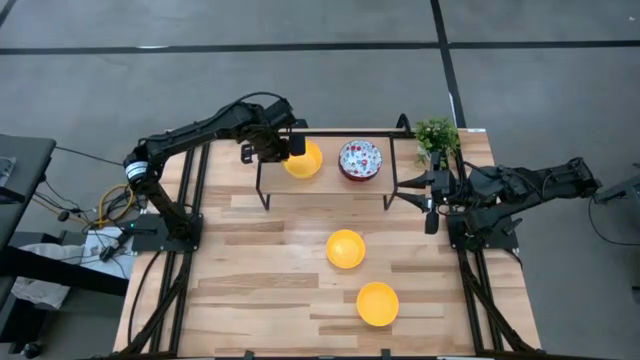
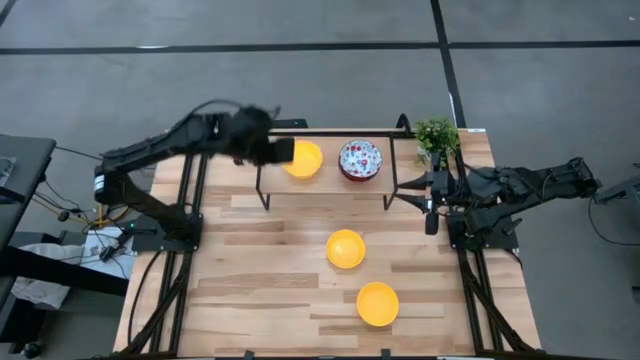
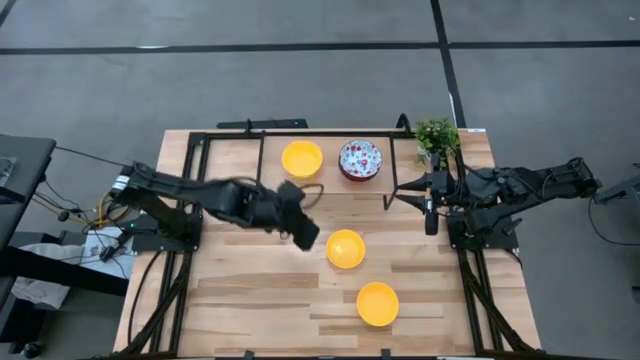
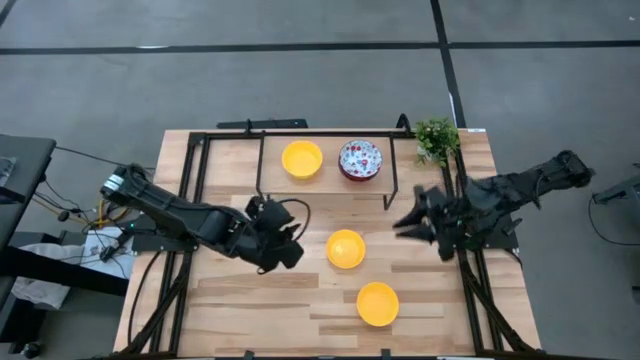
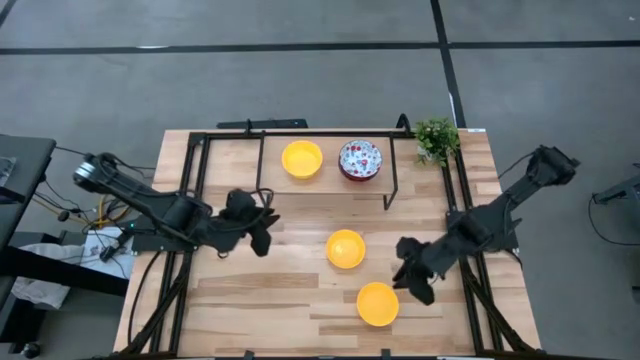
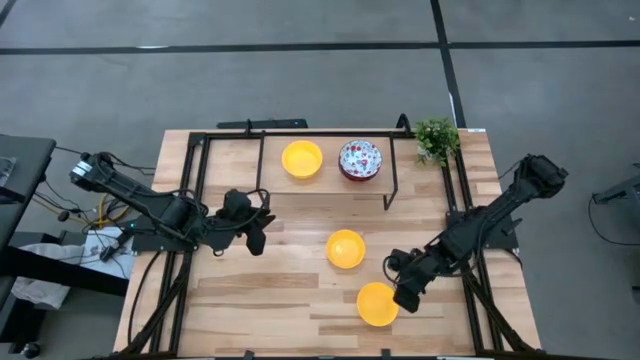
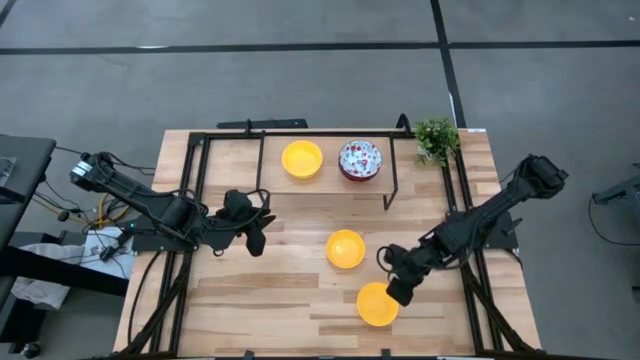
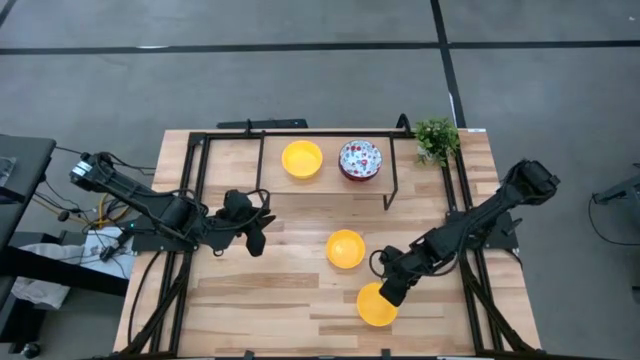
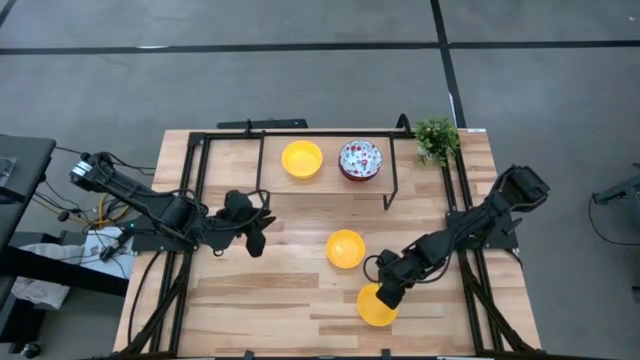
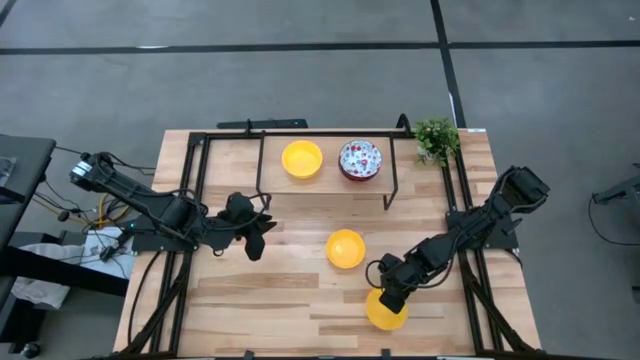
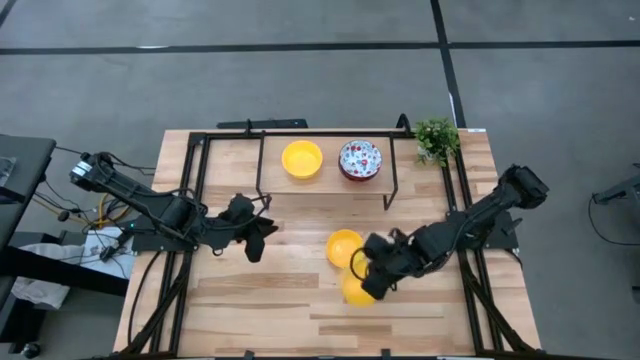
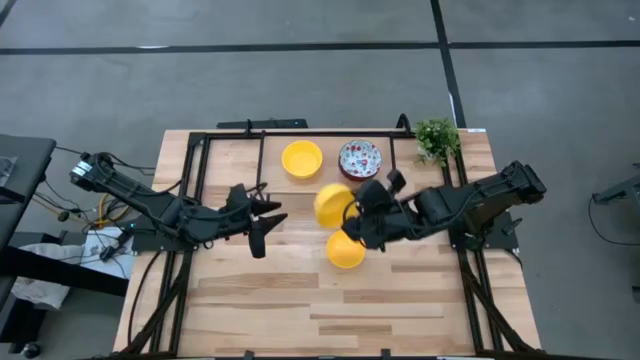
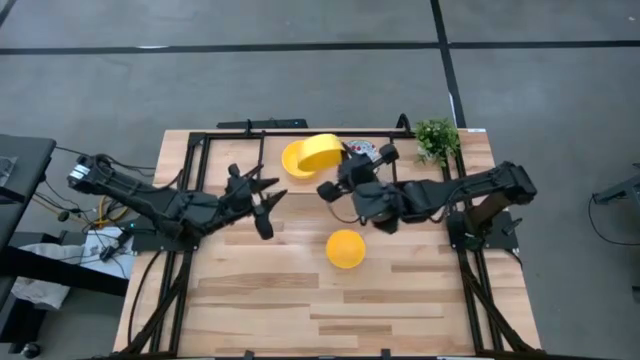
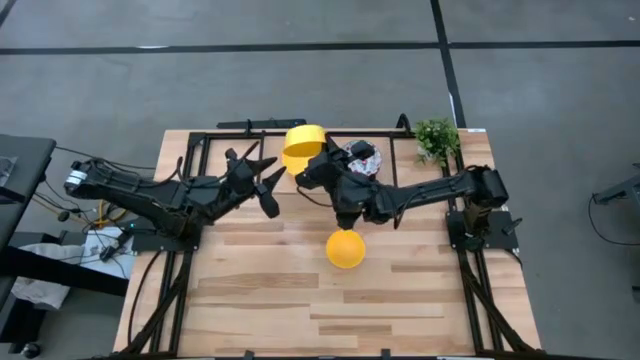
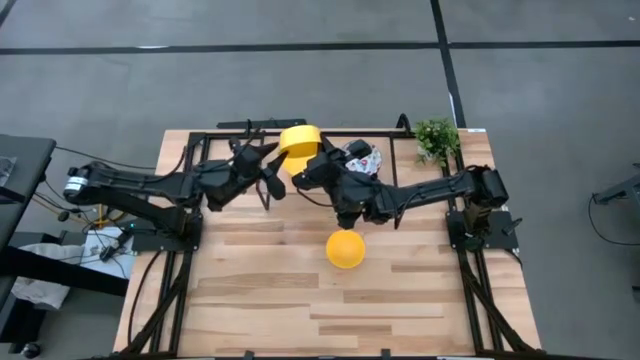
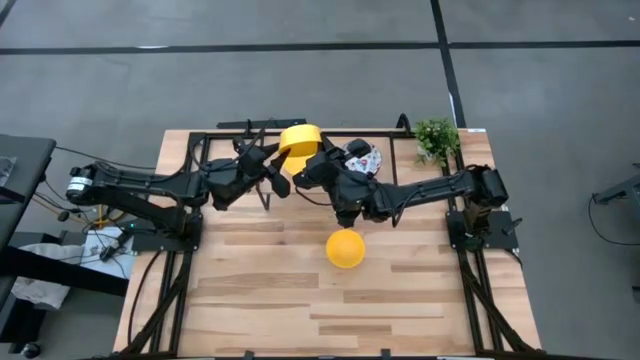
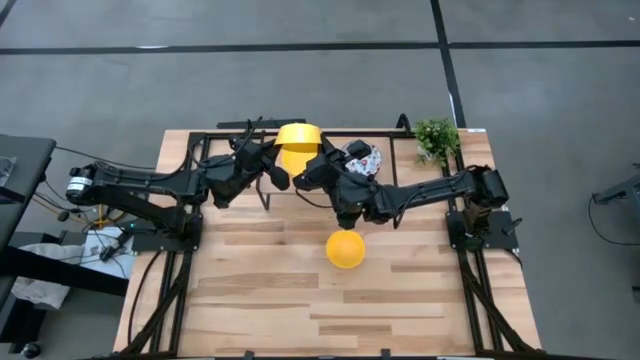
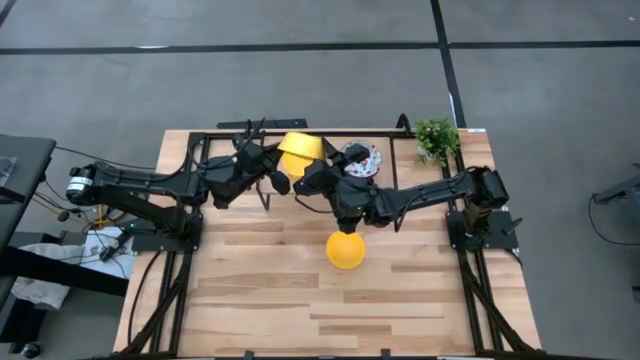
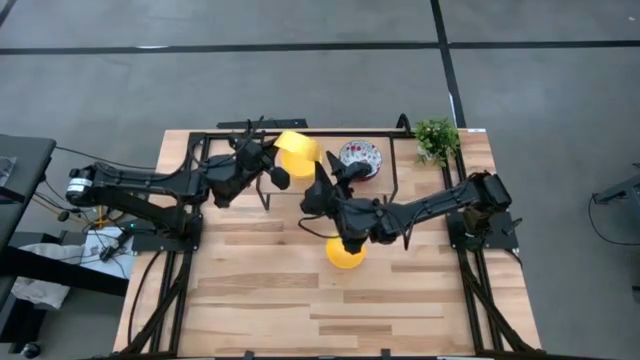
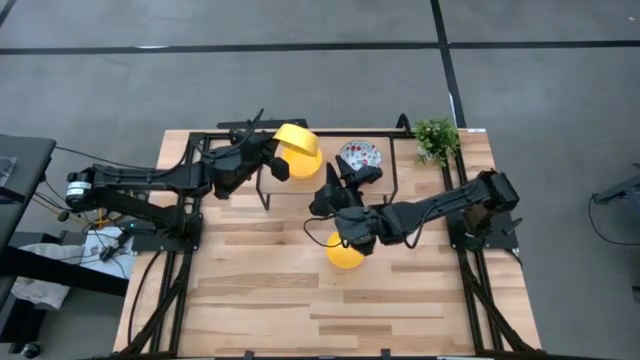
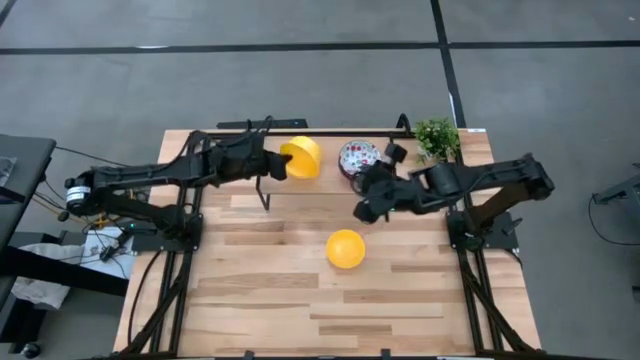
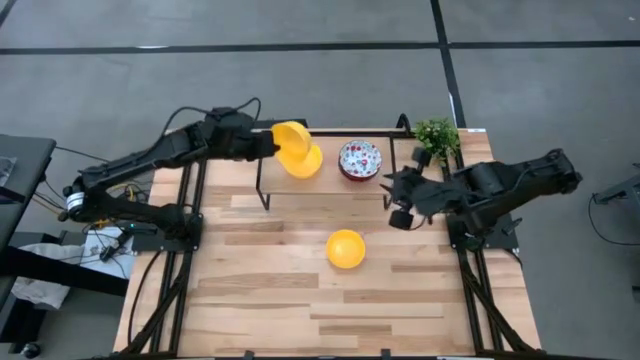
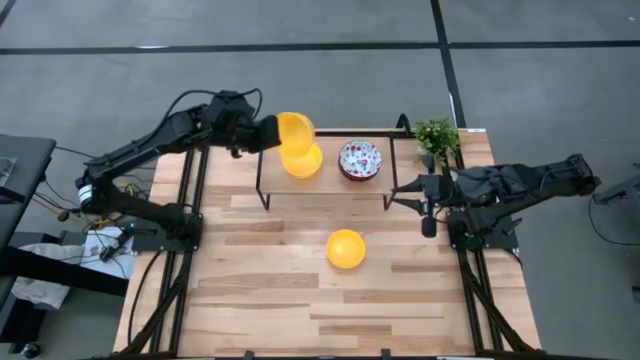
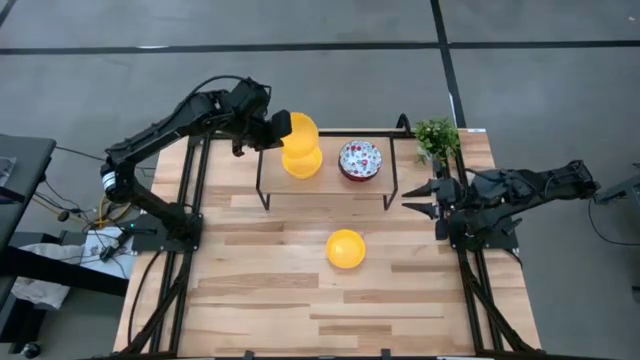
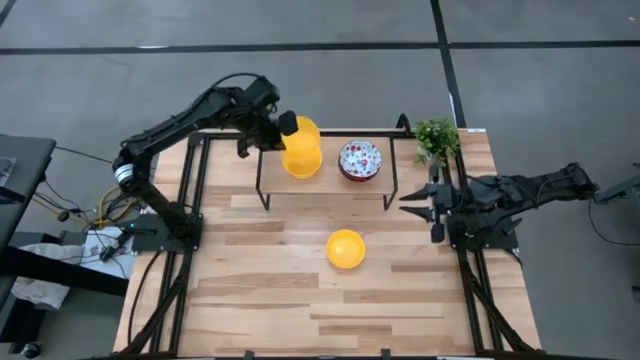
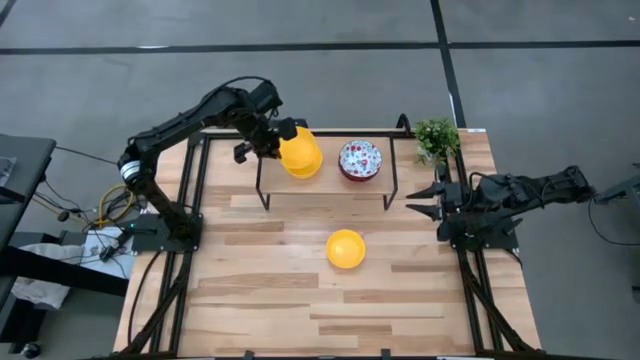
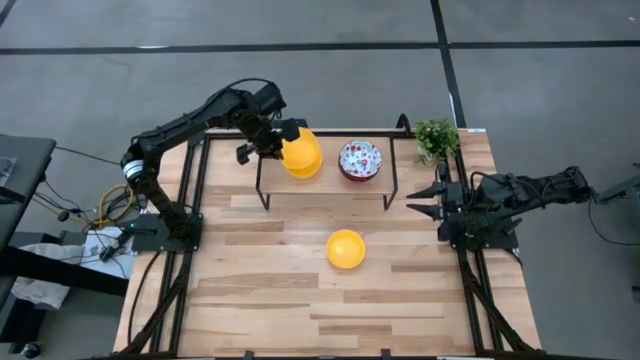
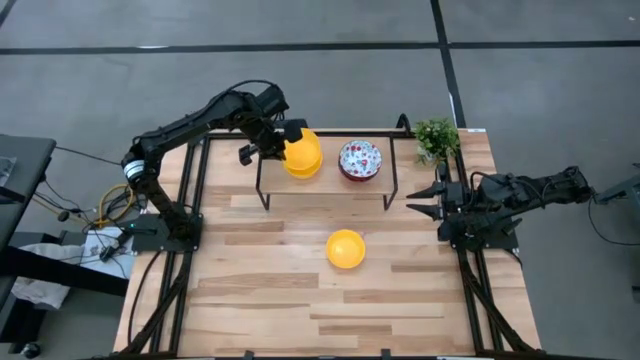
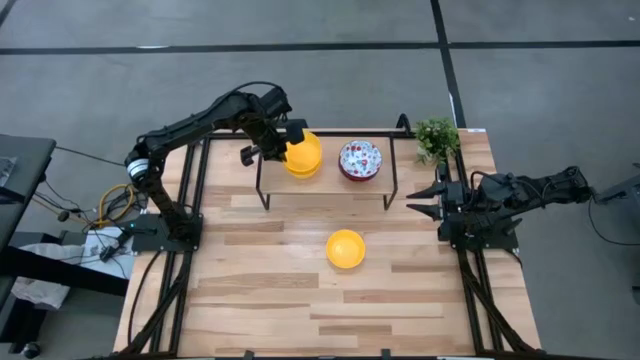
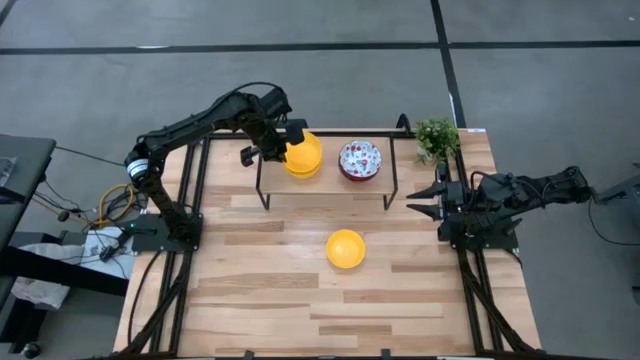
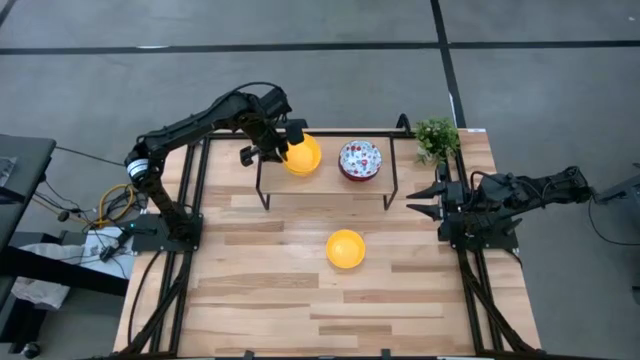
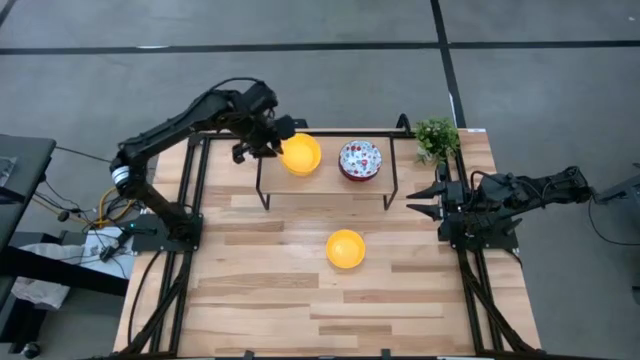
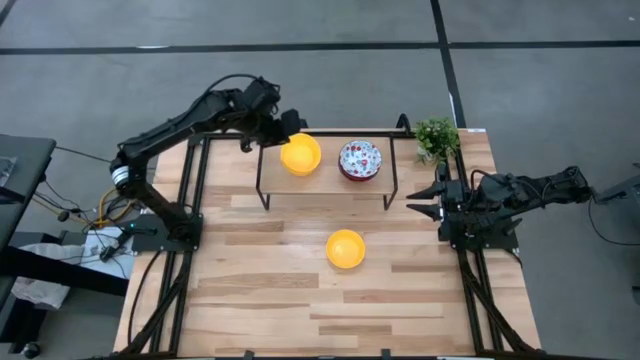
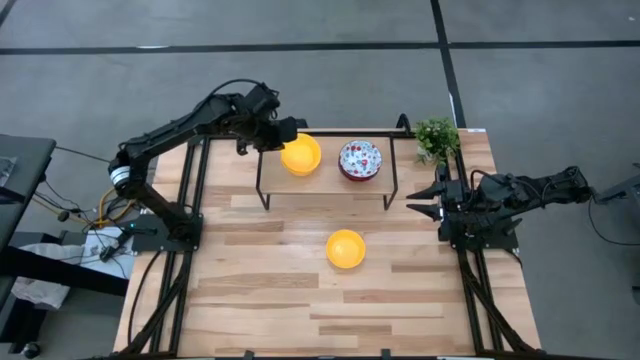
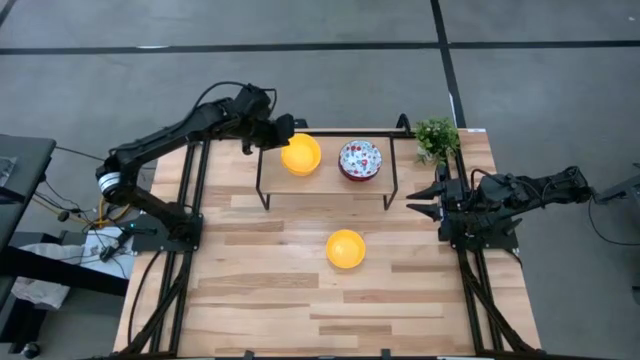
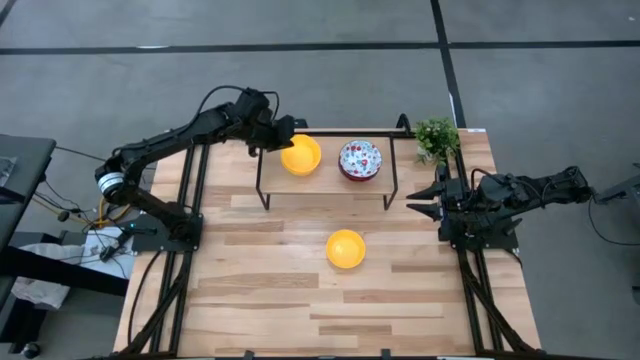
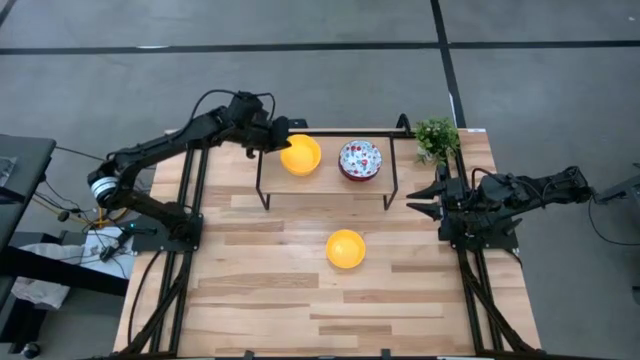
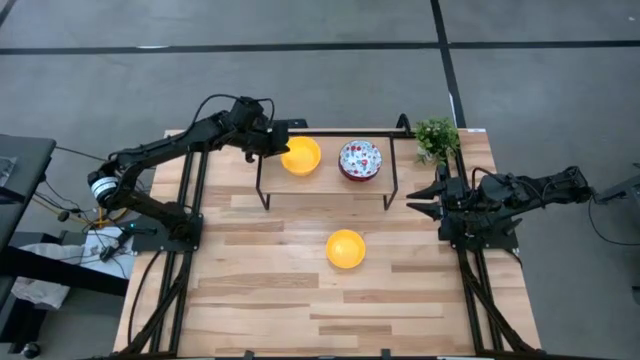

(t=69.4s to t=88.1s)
Task: Pick & Place Mini bowls
Stack the bottom yellow bowl on the yellow bowl on the shelf

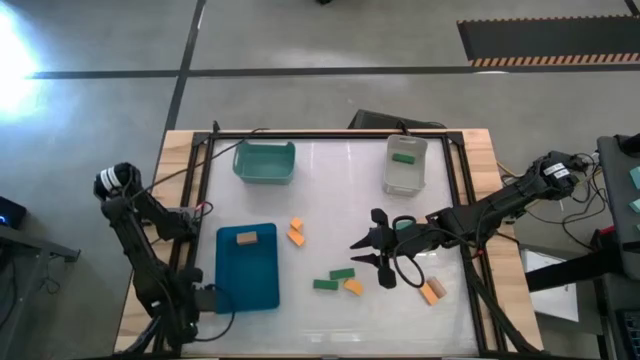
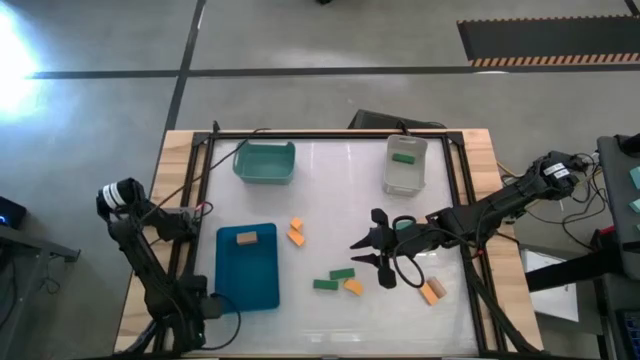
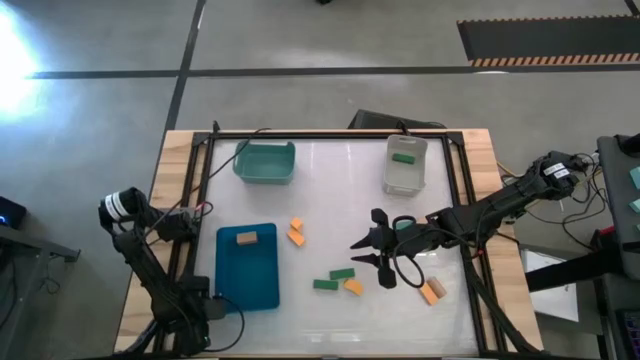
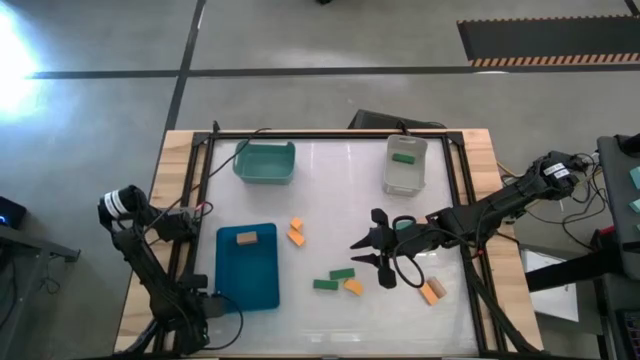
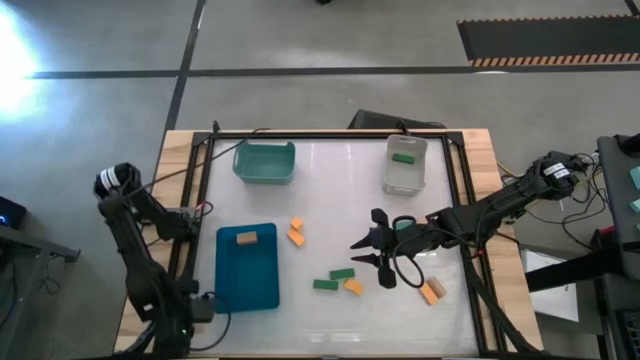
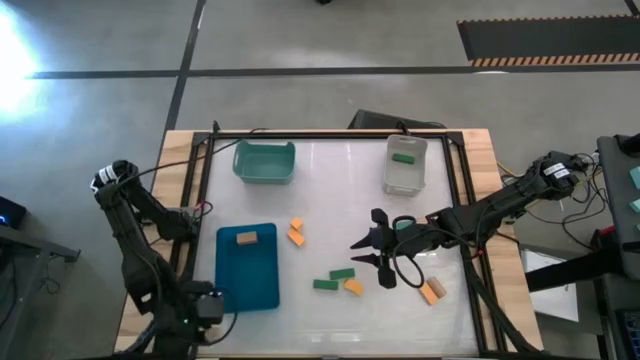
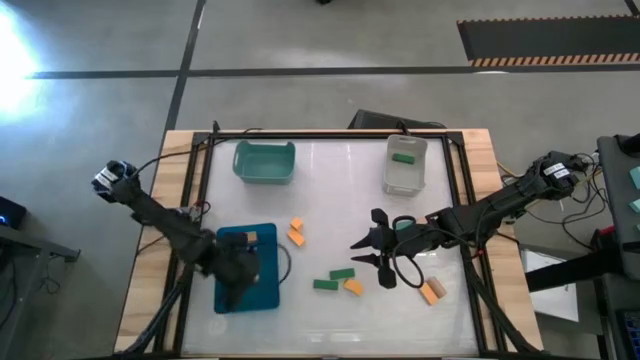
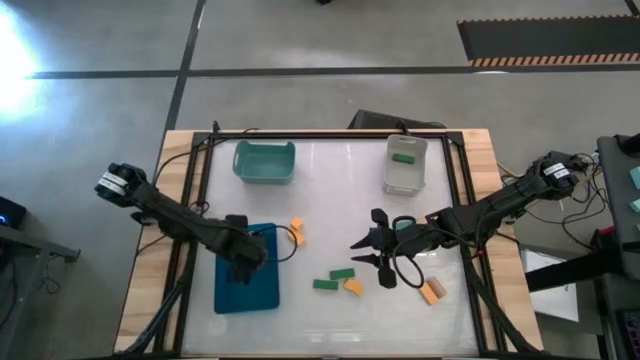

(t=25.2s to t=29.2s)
Task: Sort & place blocks by color
Put the light brown block into the blue bin
